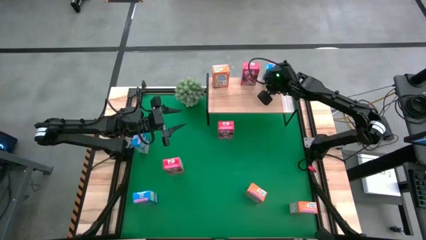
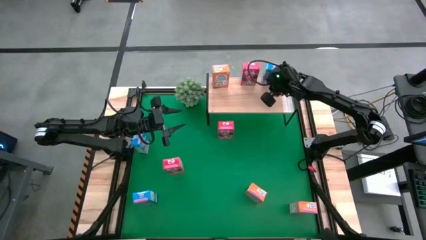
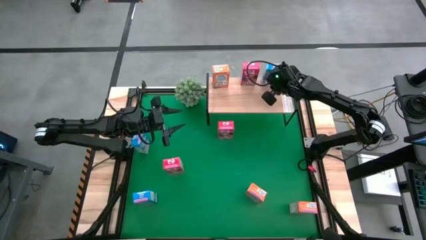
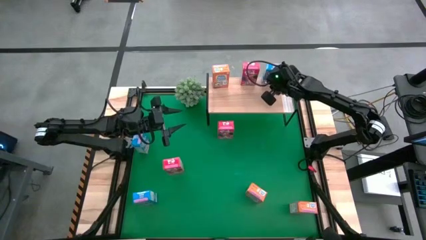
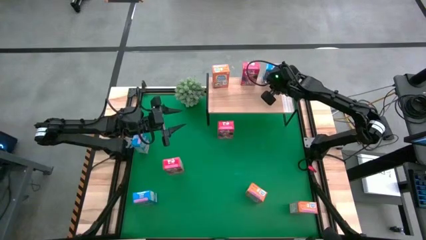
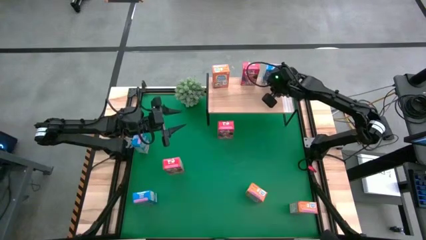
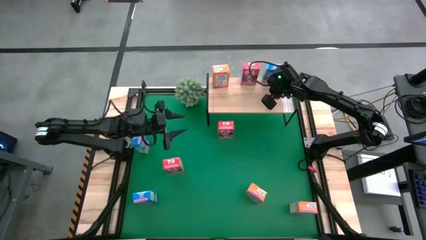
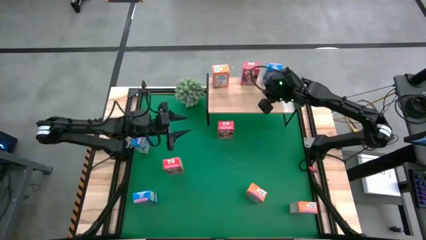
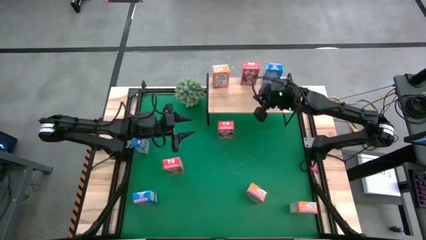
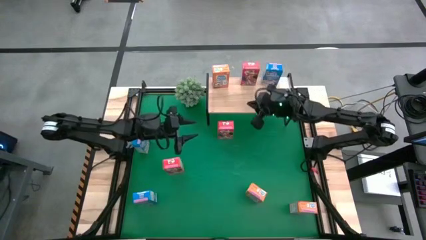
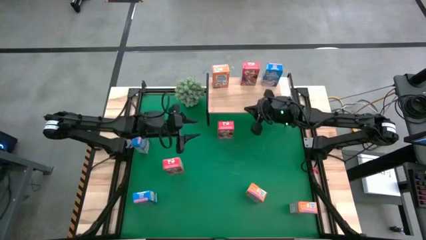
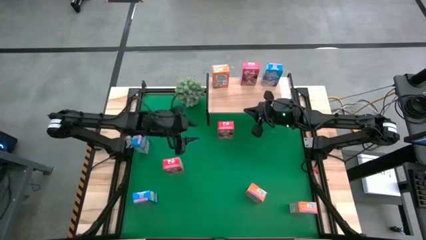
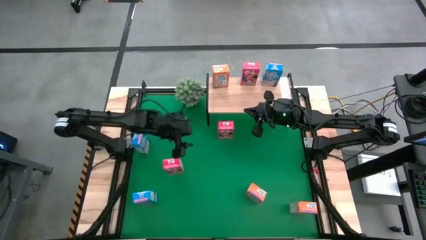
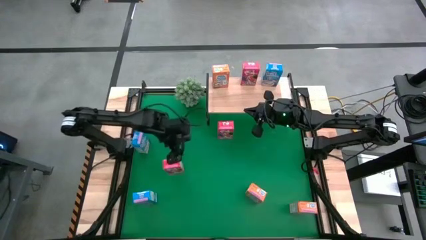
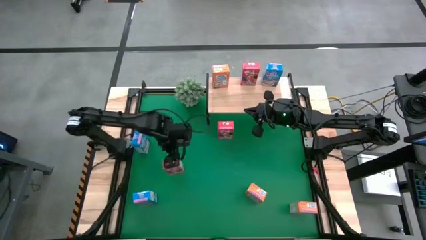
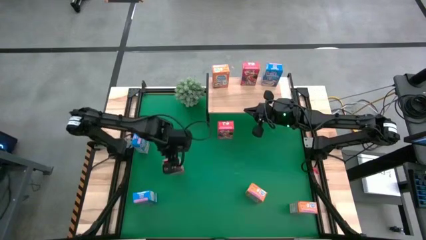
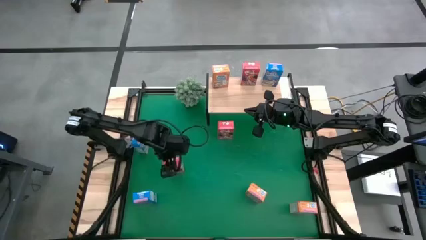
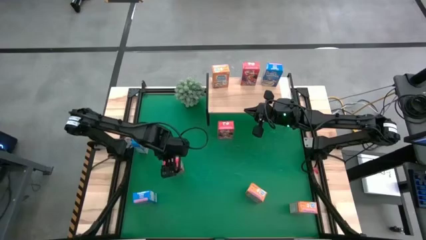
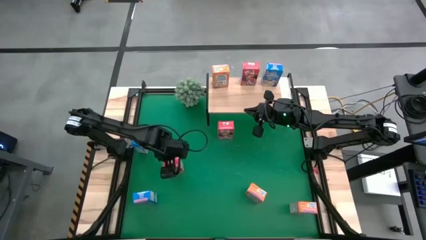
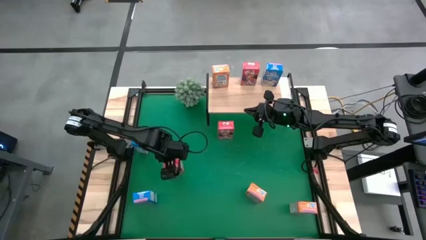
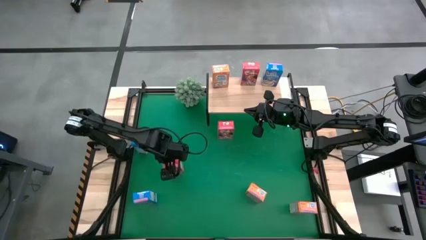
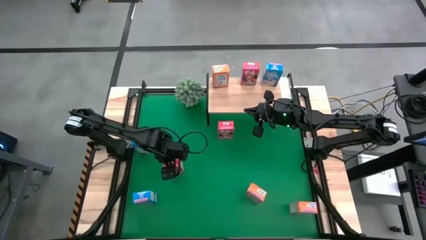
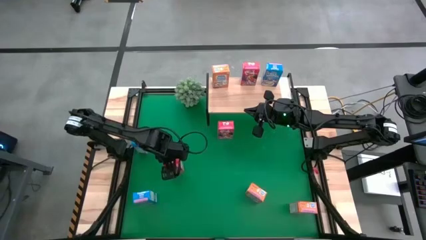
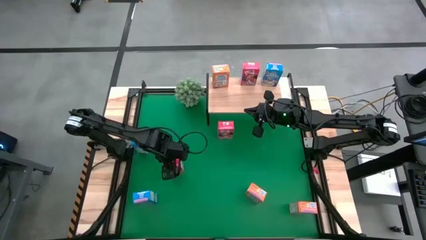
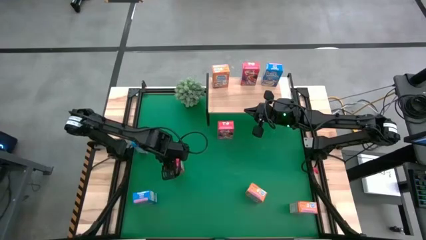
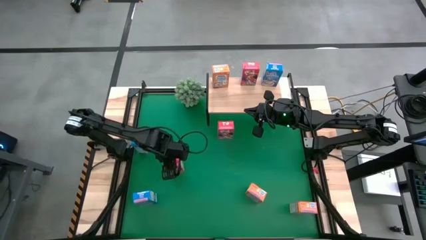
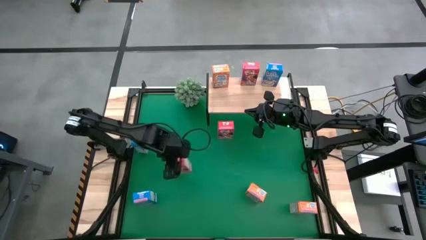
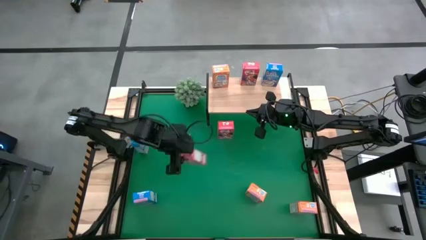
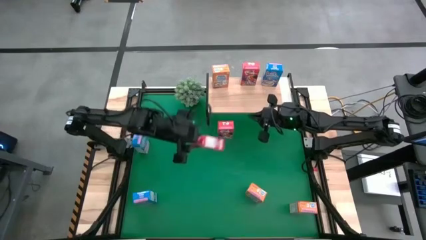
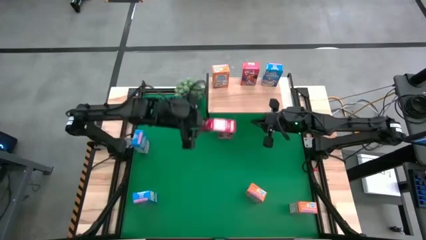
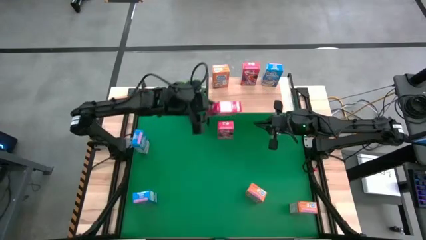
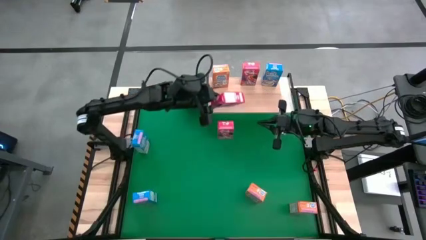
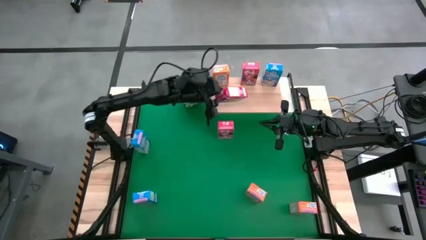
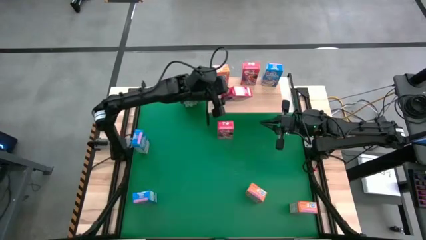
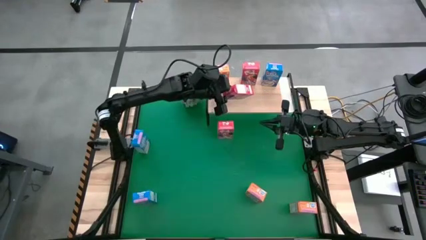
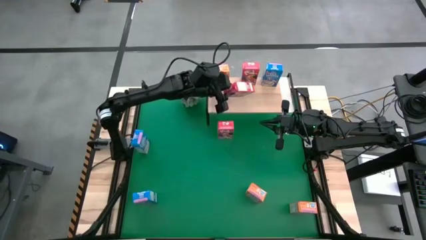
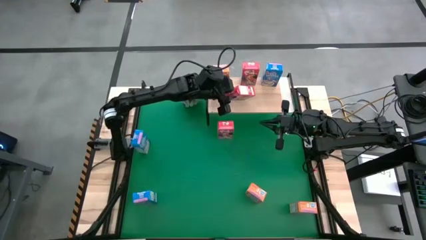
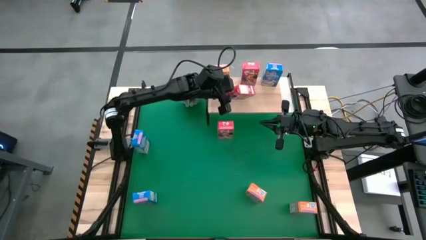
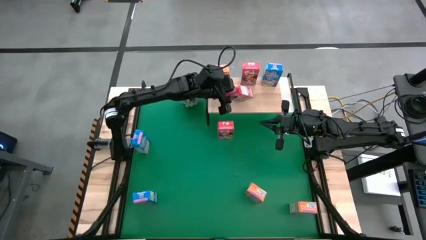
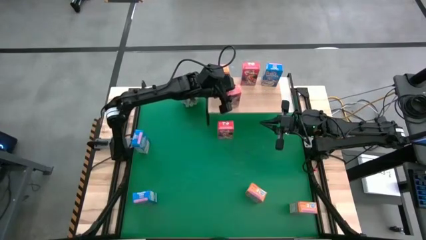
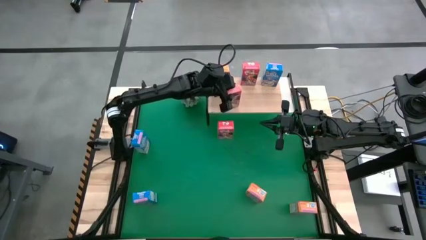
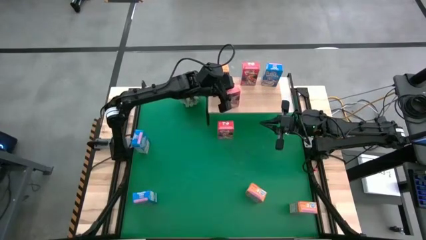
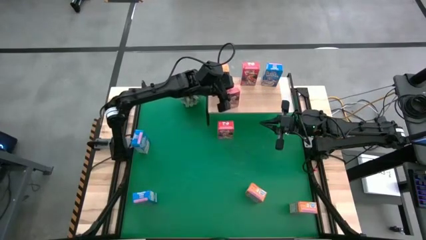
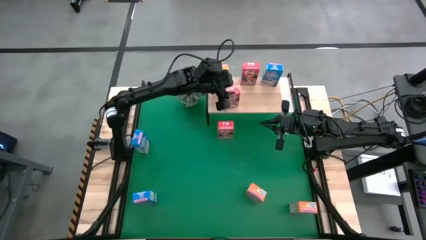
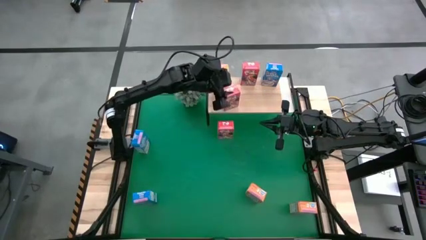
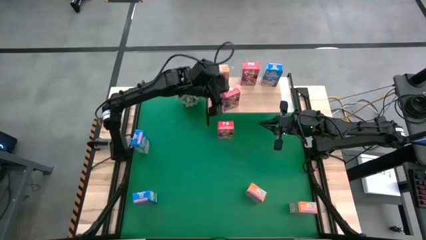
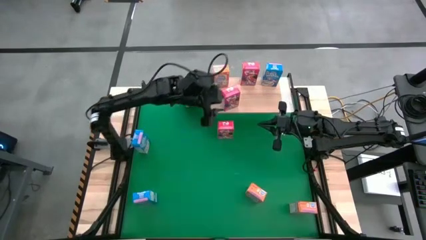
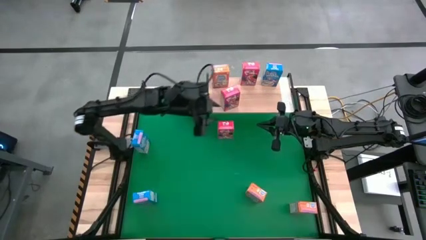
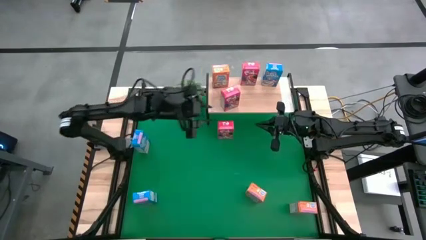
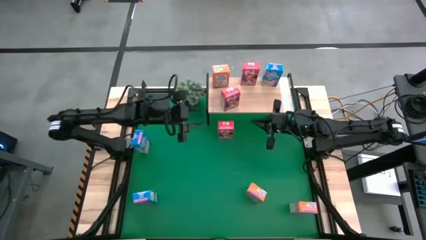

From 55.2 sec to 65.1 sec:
Task: Stack cereal on shelf
Put the left red cereal box on the shelf aligned with the other red cereal box
